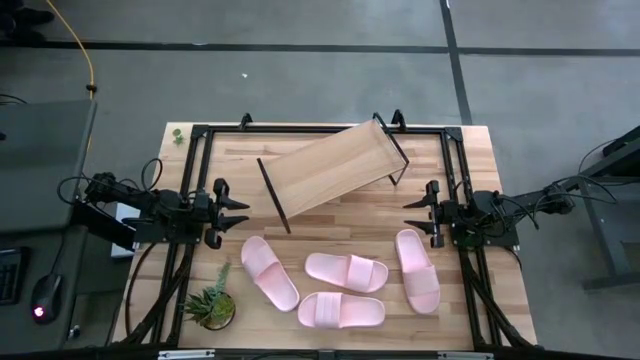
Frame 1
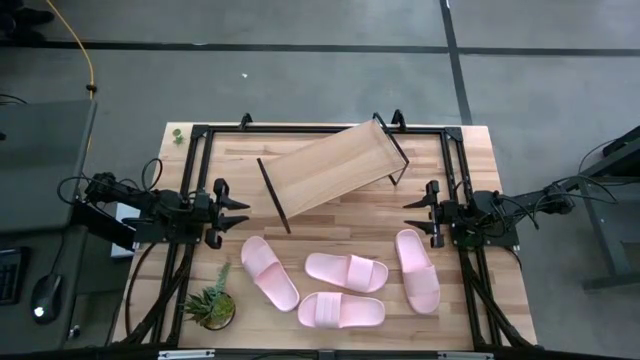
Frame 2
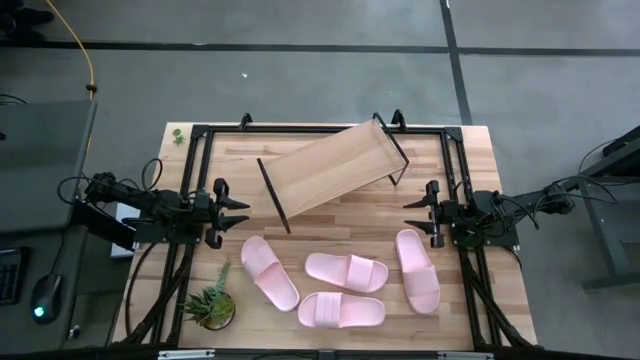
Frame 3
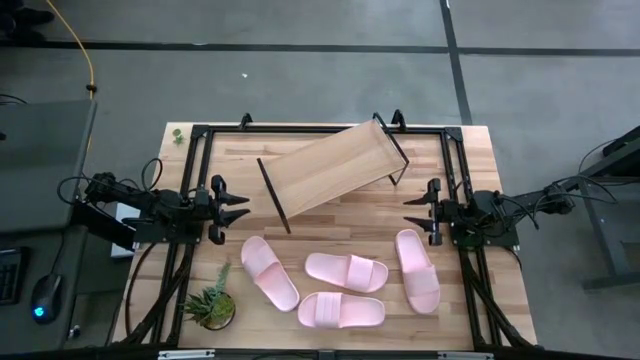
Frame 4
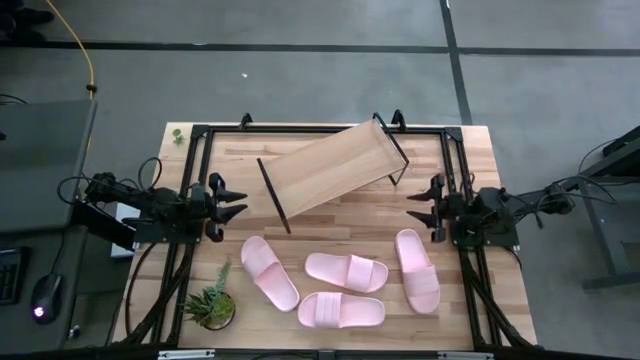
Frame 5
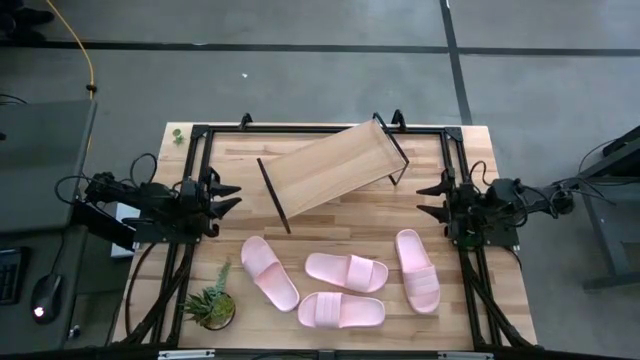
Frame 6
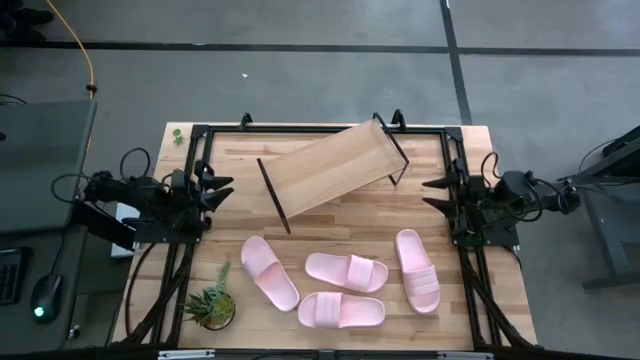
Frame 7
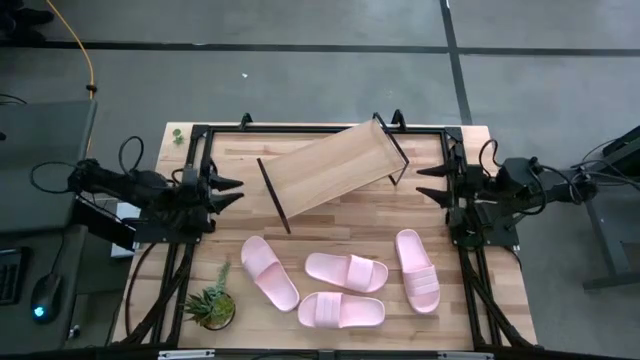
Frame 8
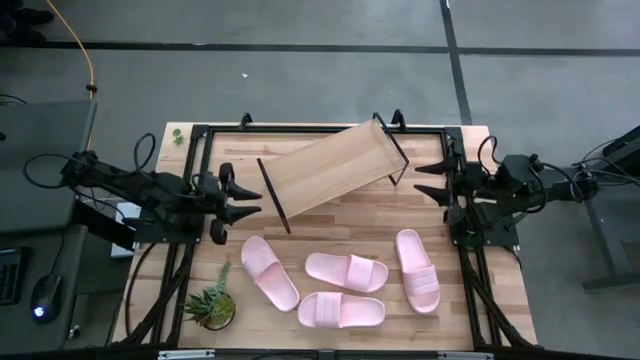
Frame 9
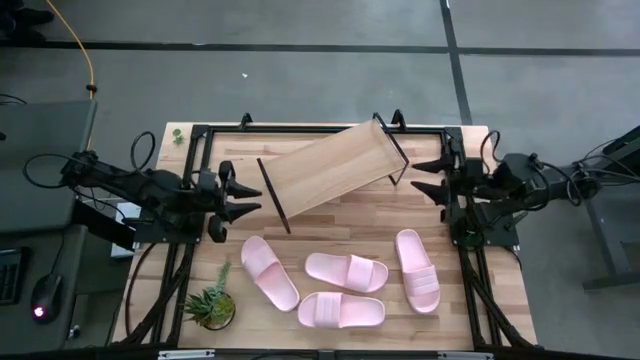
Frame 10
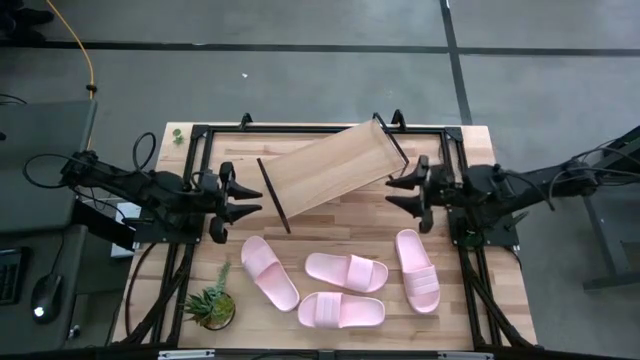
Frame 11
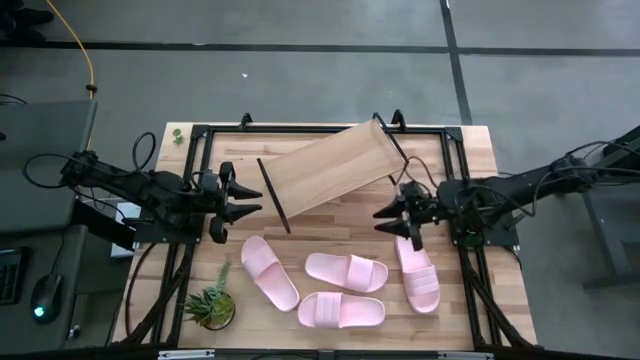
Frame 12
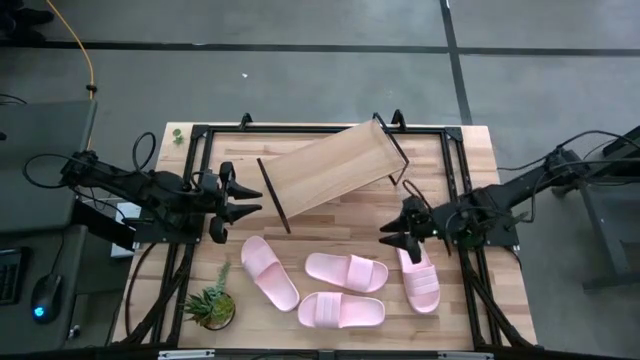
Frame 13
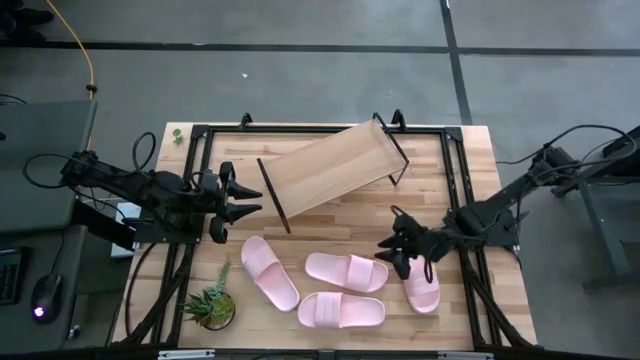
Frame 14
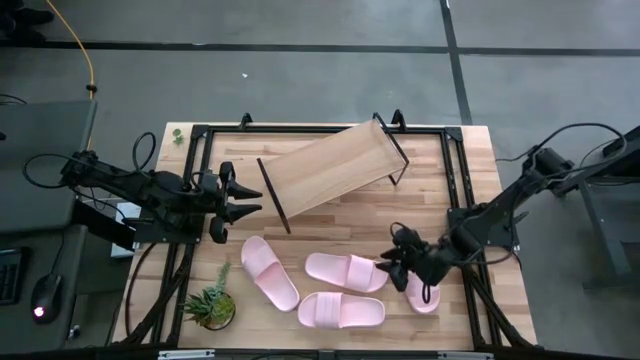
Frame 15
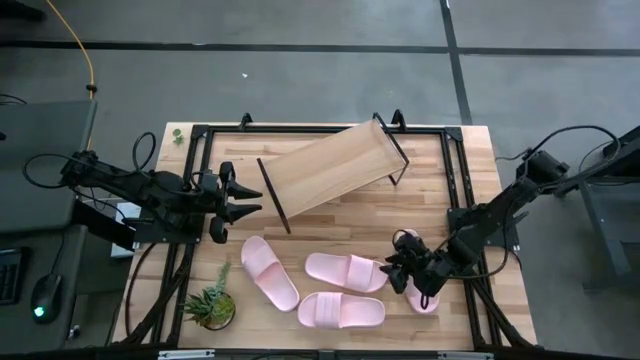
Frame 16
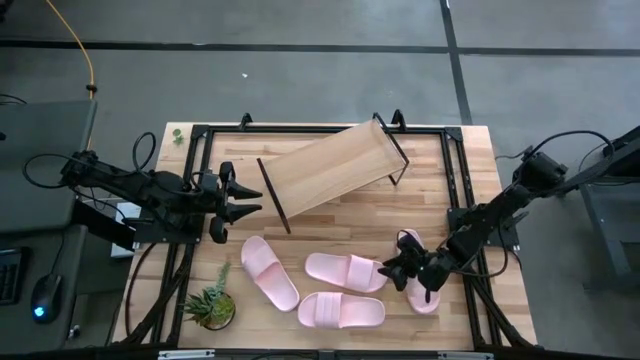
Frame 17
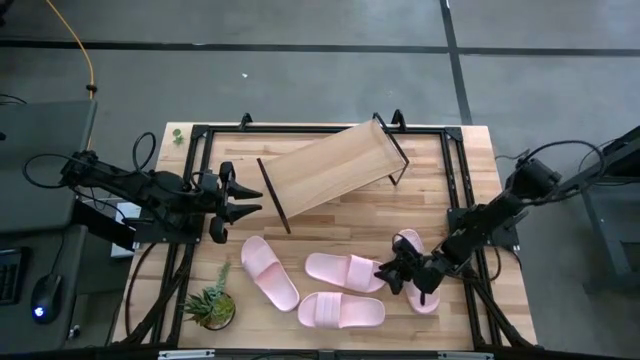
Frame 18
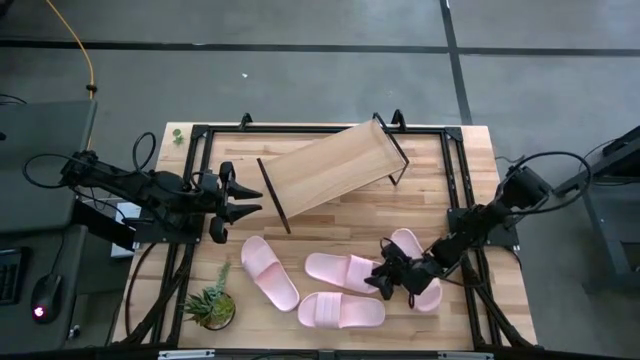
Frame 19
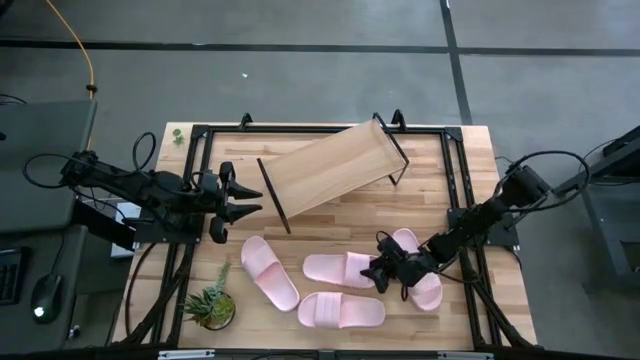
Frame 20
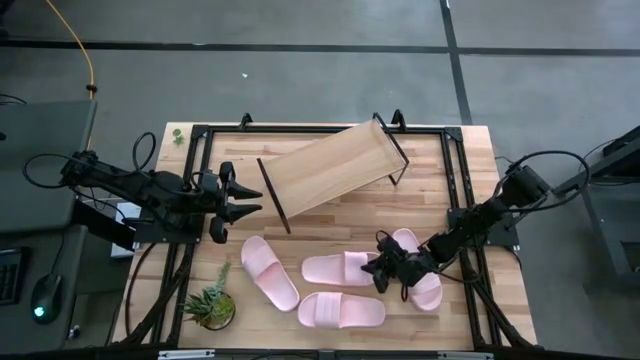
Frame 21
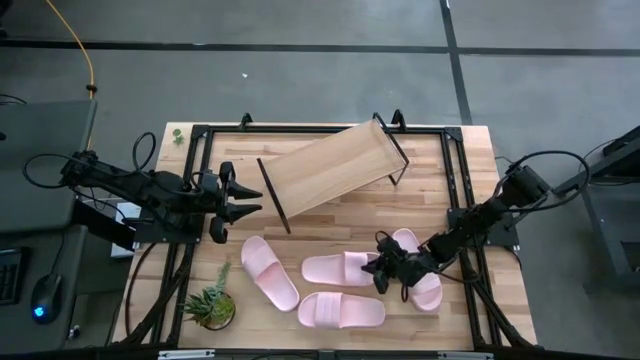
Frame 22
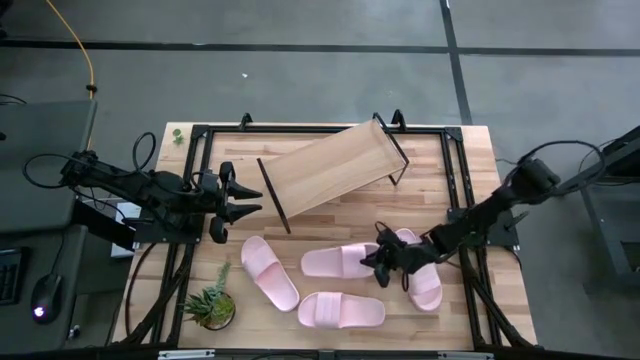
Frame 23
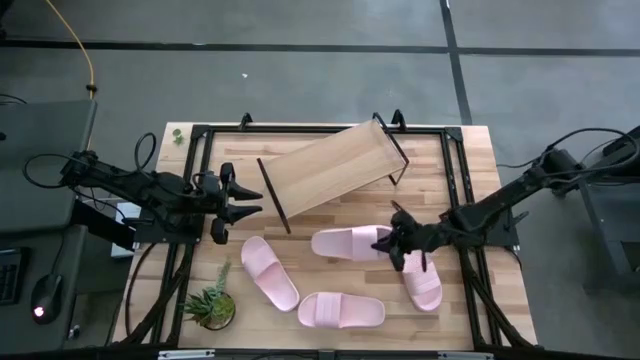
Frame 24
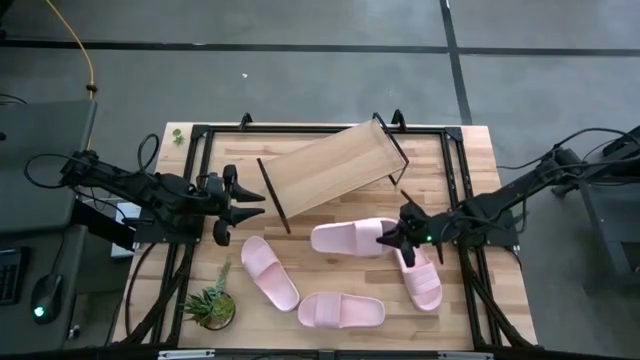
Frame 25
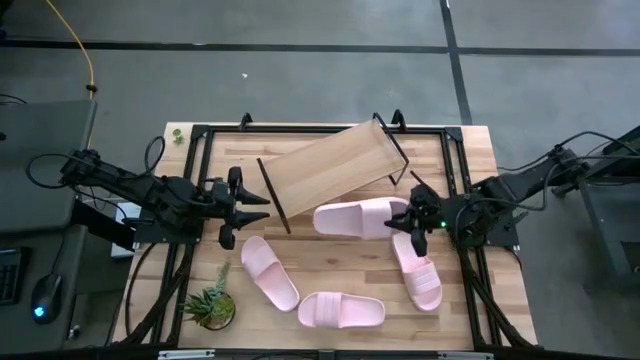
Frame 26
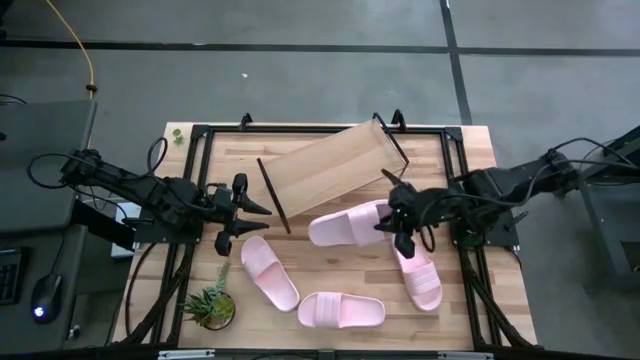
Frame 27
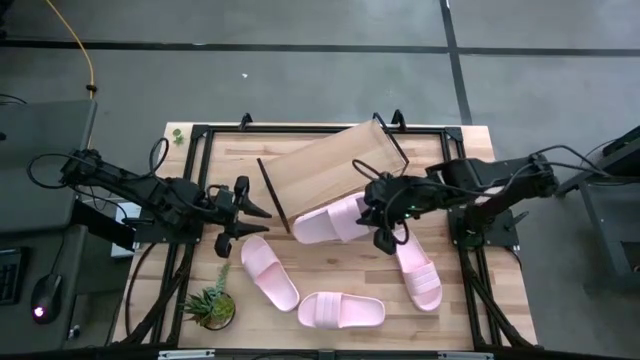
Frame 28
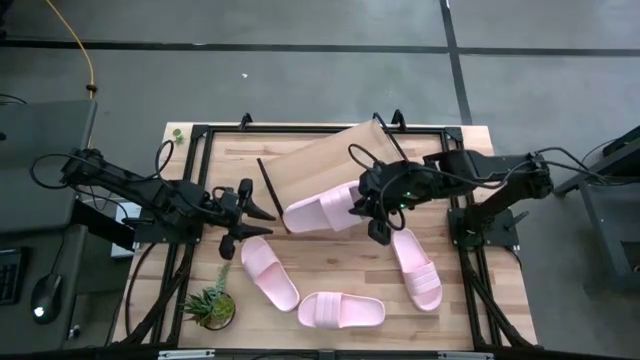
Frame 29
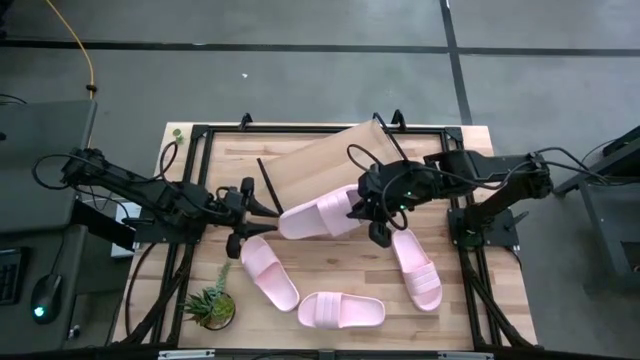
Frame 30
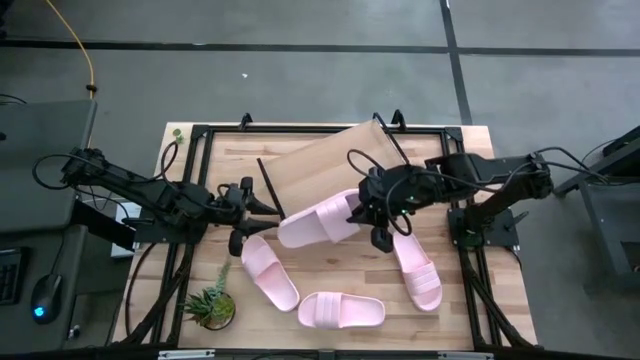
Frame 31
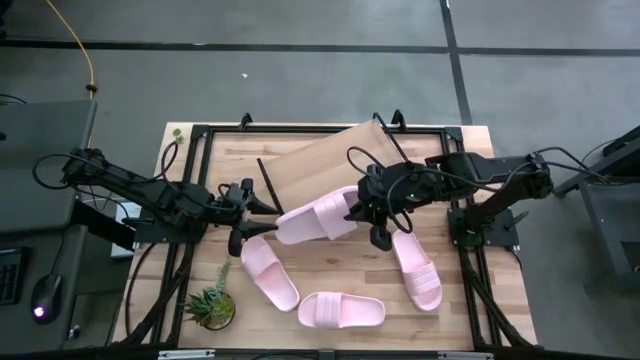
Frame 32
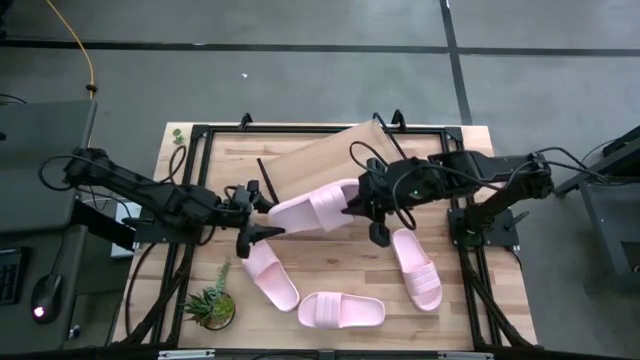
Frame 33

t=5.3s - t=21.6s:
Task: Pick and place slides into the shelf
Put the pink slide on the shelf

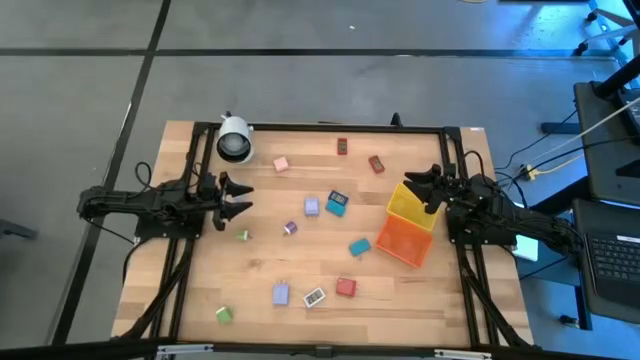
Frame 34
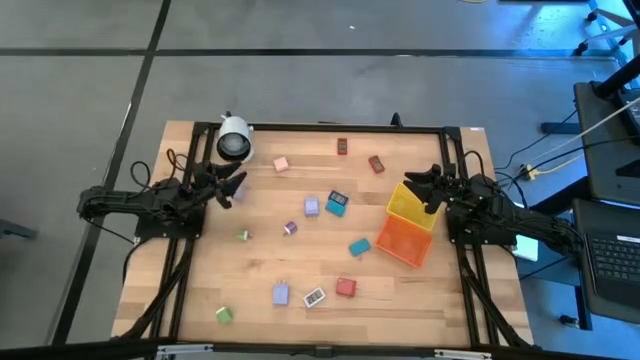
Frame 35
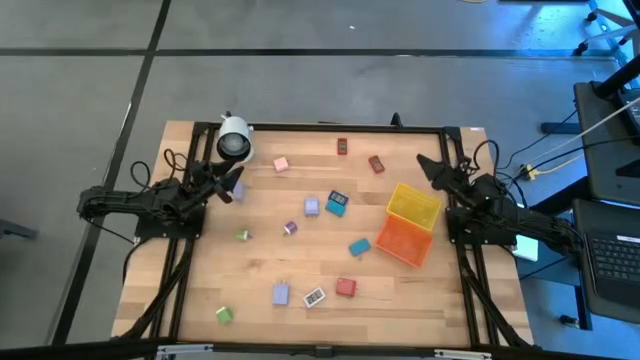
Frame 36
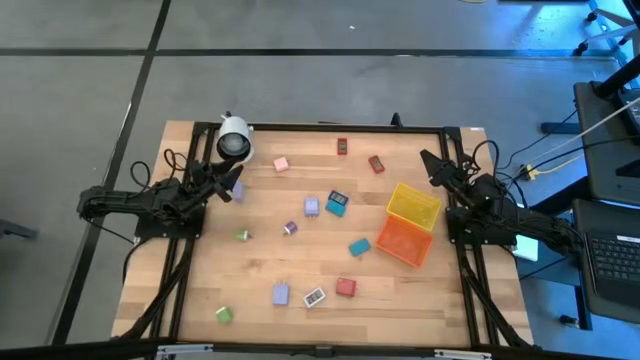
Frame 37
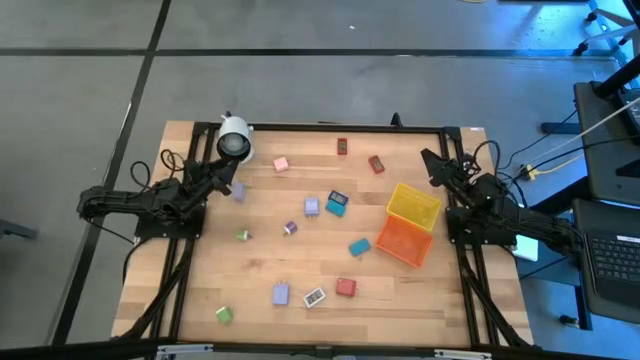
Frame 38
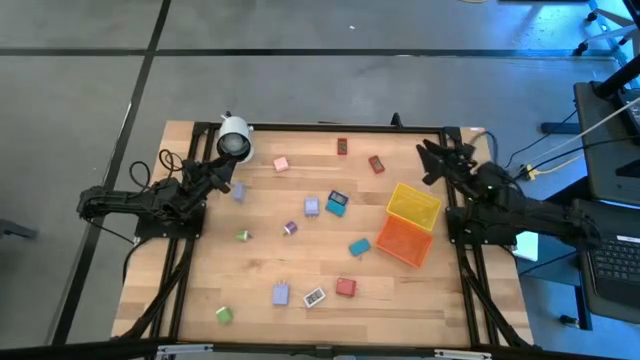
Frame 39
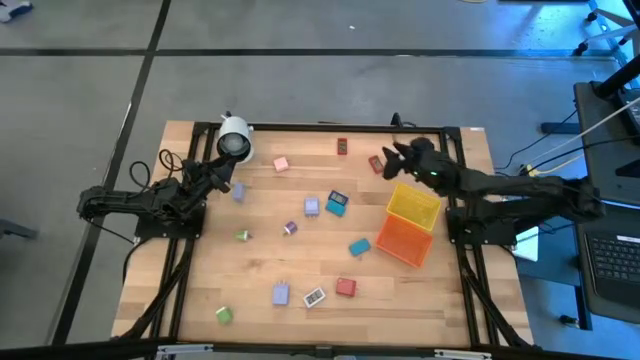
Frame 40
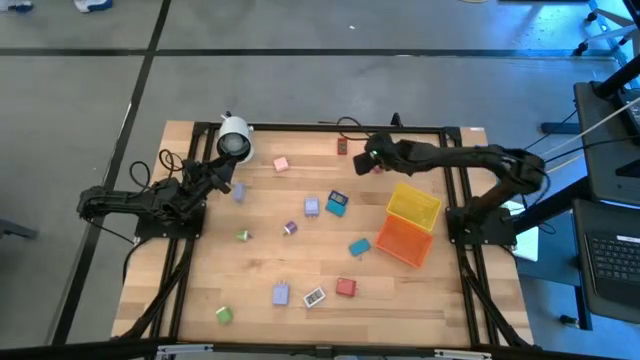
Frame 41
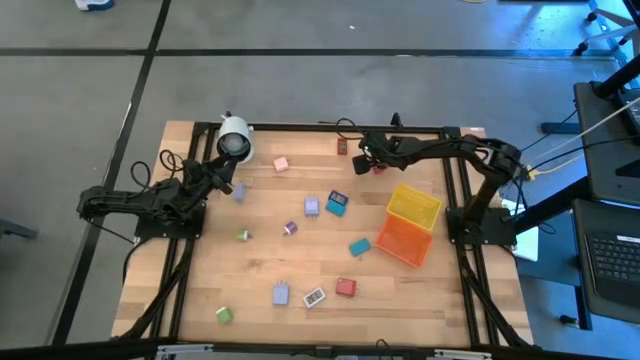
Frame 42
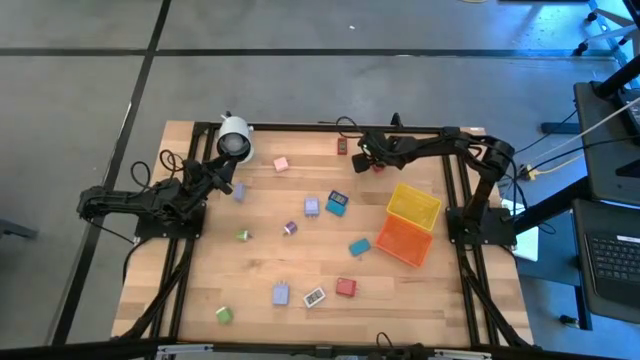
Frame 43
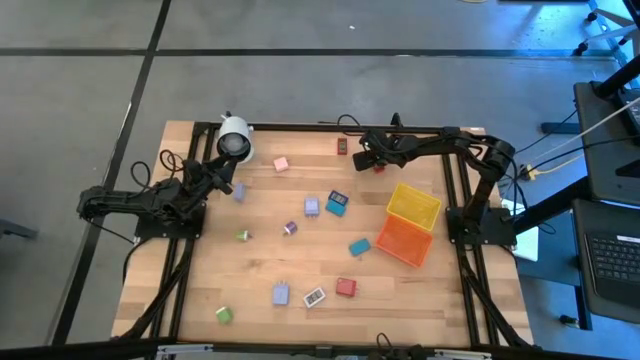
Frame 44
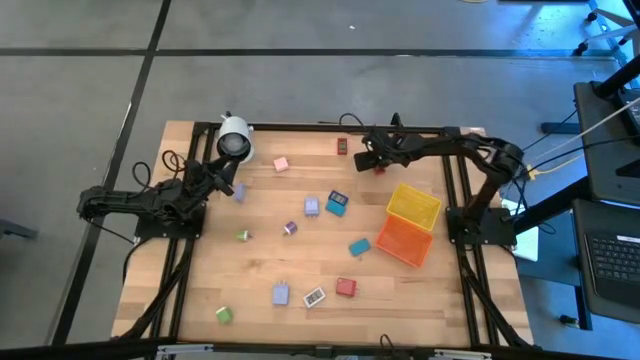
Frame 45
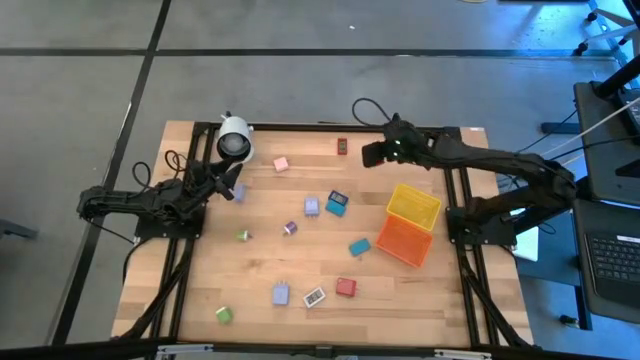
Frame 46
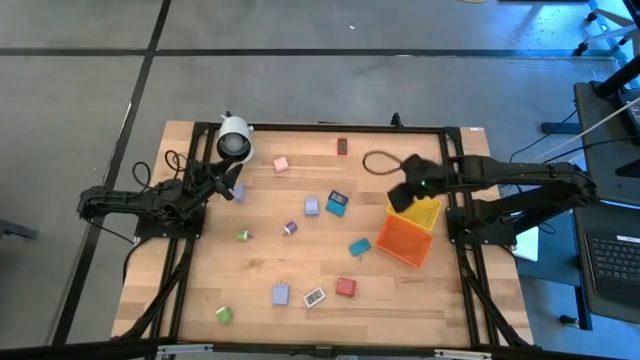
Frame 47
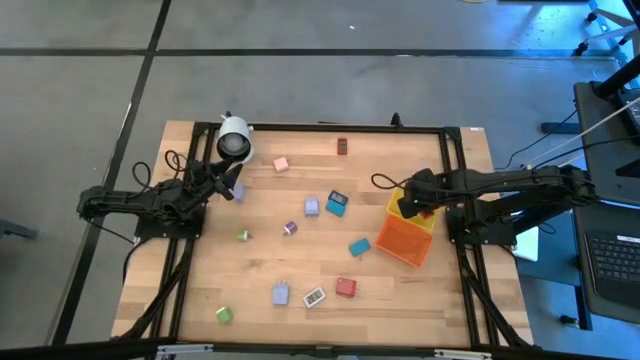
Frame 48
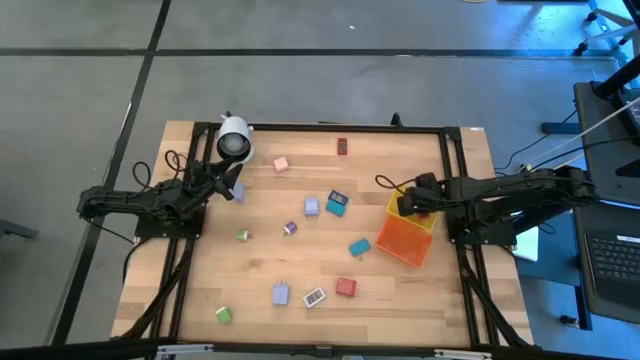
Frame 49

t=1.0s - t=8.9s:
Task: Pick & Place Office items
Put the bottom red digital timer into the yellow basket
